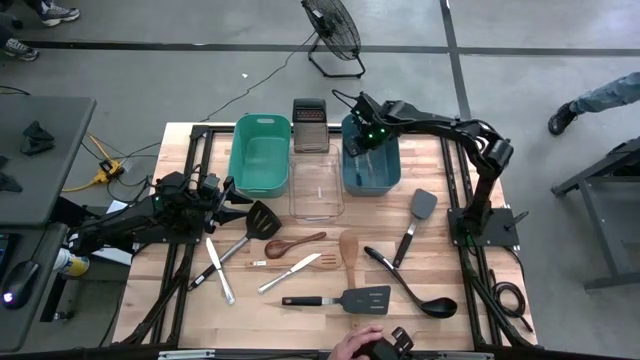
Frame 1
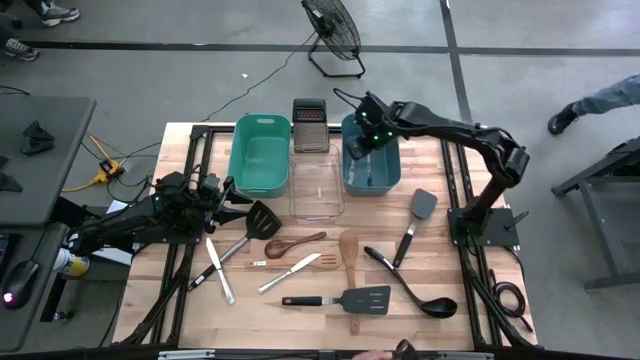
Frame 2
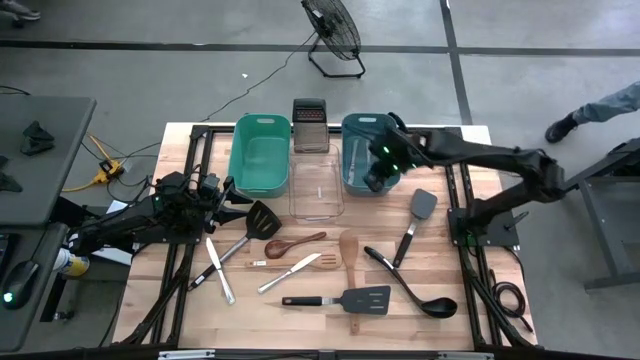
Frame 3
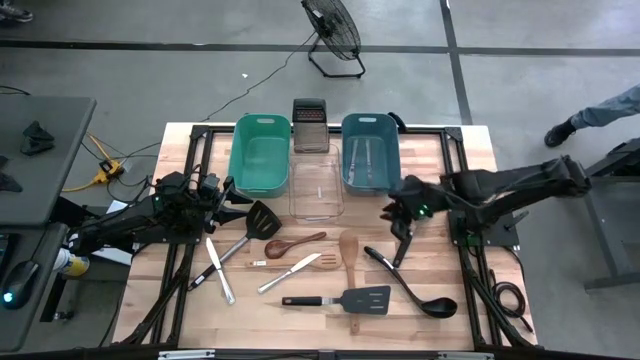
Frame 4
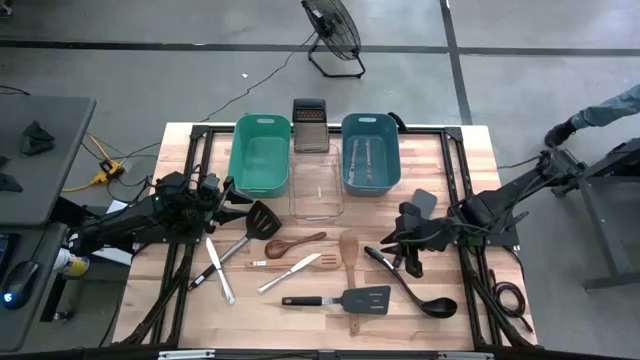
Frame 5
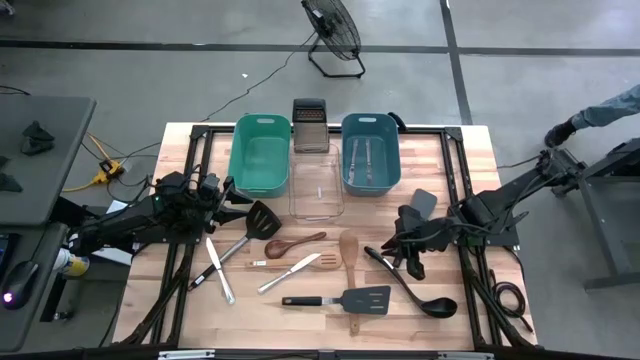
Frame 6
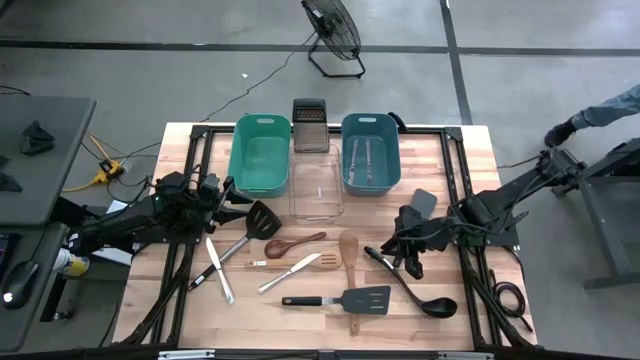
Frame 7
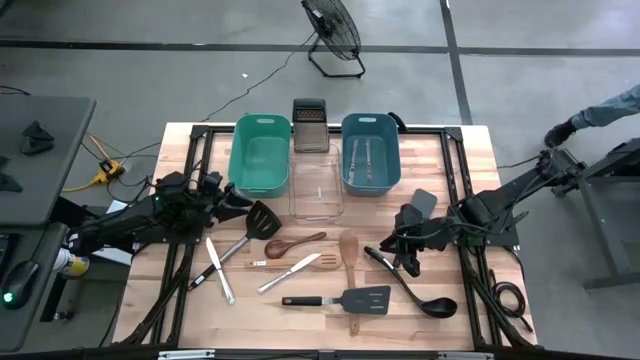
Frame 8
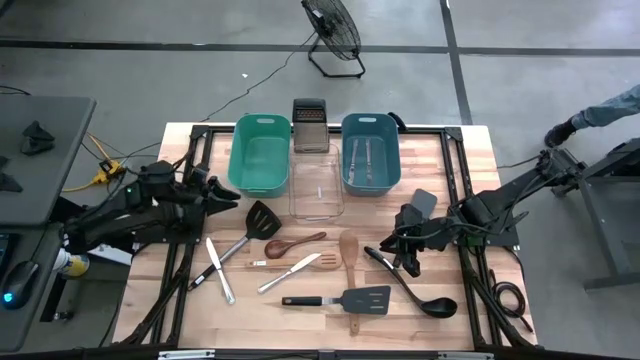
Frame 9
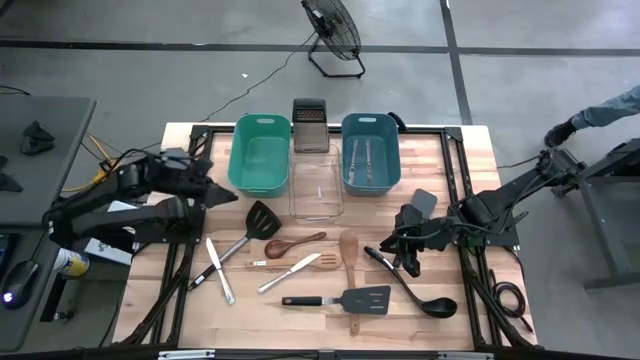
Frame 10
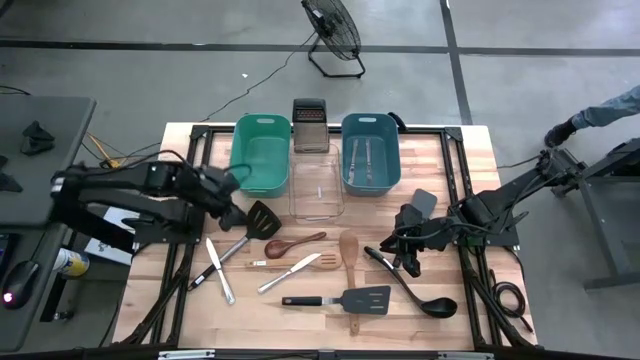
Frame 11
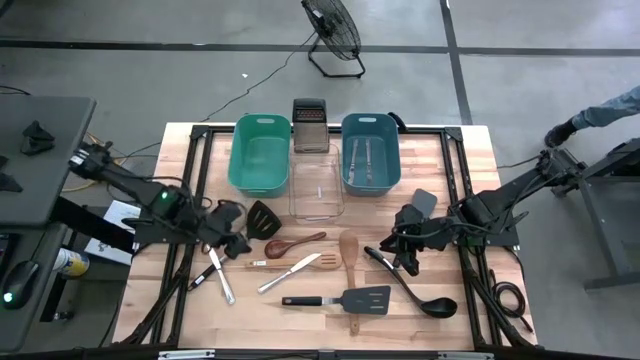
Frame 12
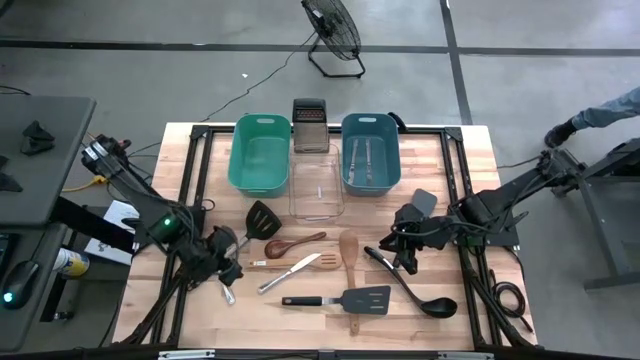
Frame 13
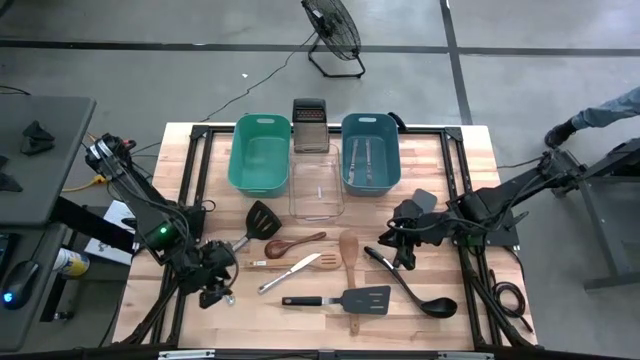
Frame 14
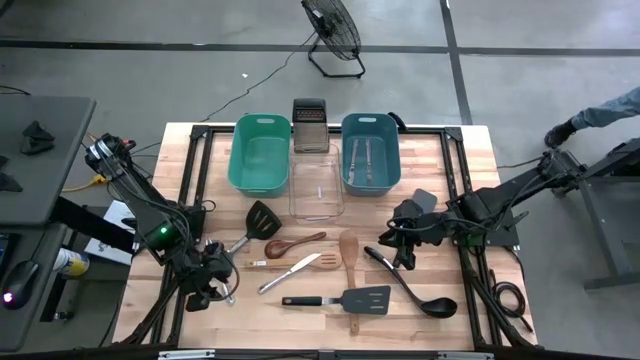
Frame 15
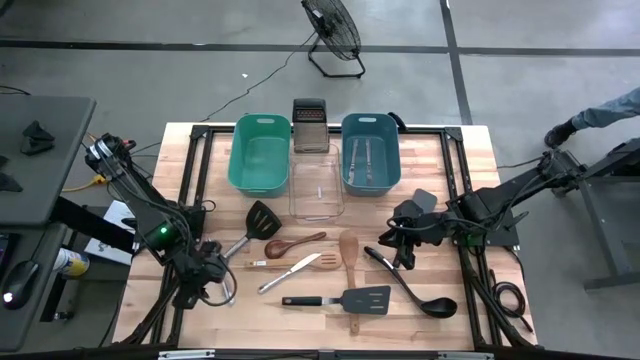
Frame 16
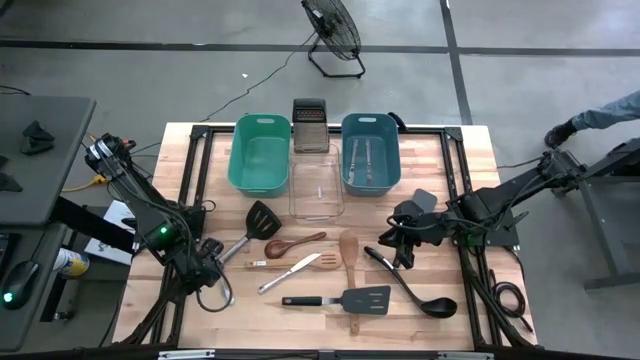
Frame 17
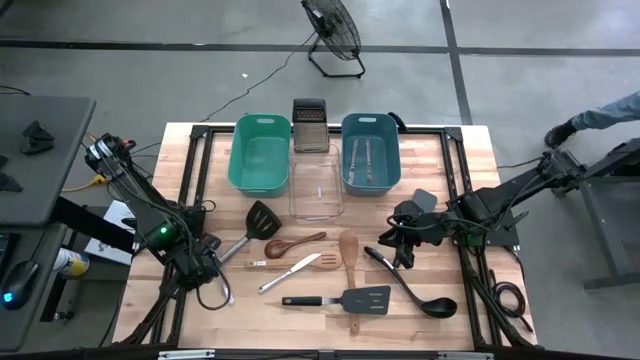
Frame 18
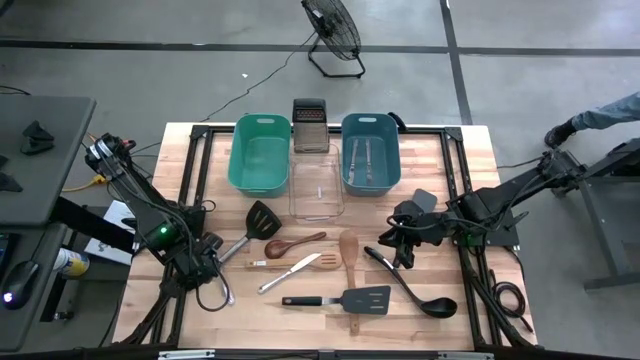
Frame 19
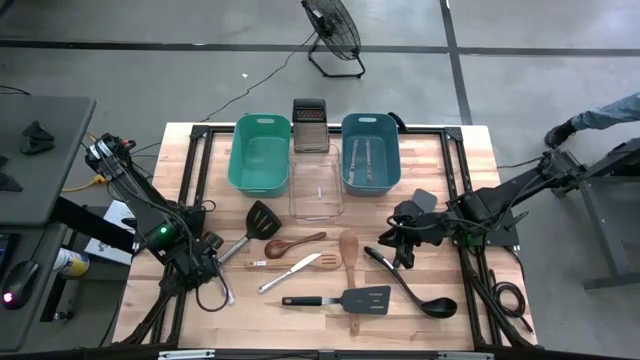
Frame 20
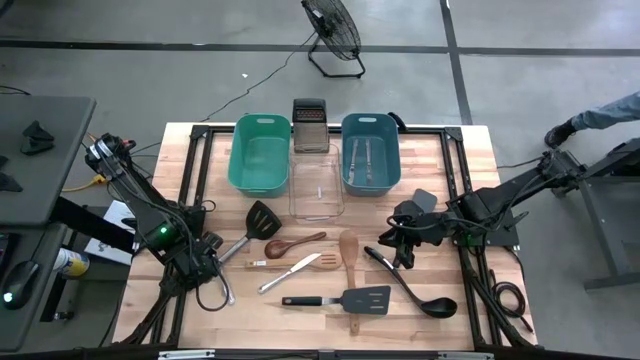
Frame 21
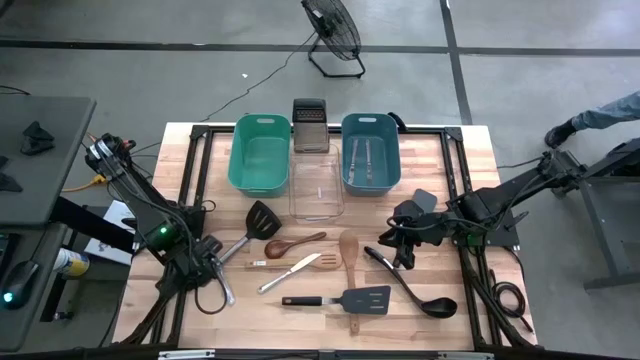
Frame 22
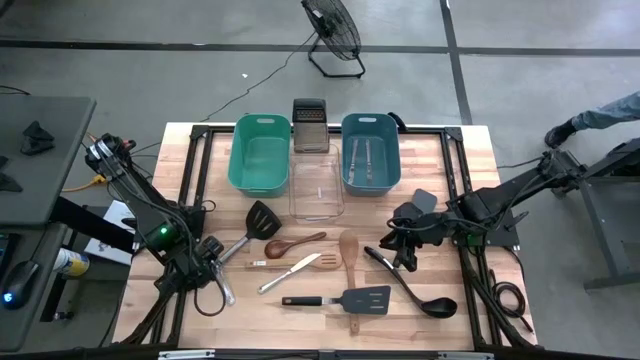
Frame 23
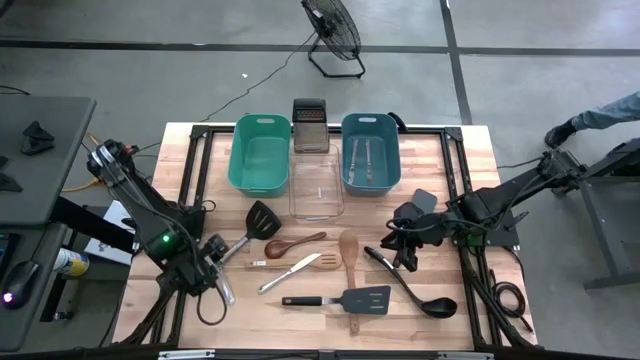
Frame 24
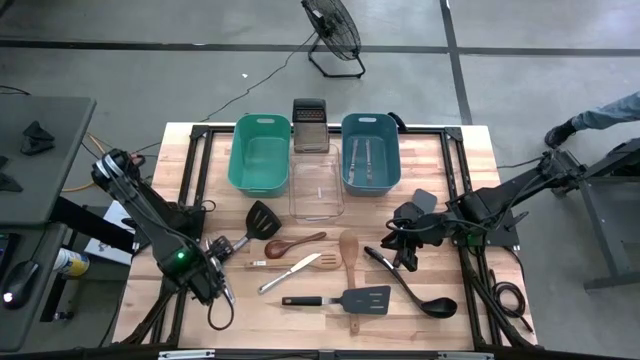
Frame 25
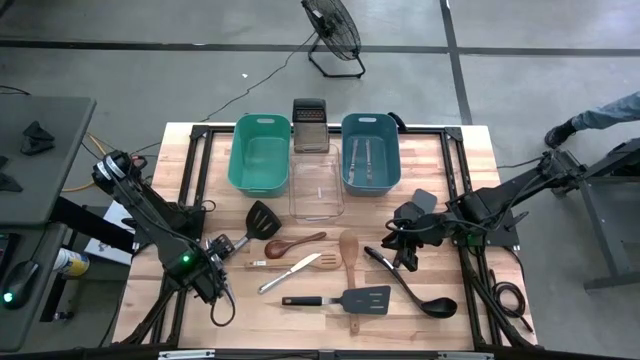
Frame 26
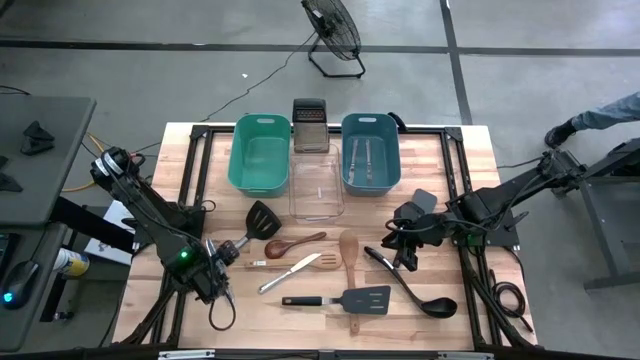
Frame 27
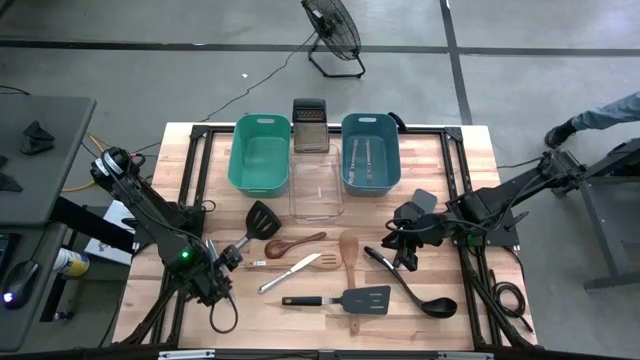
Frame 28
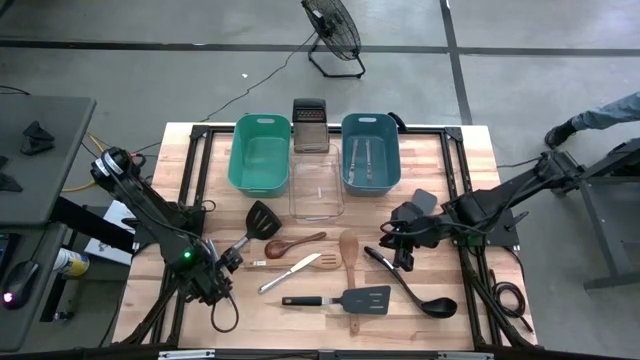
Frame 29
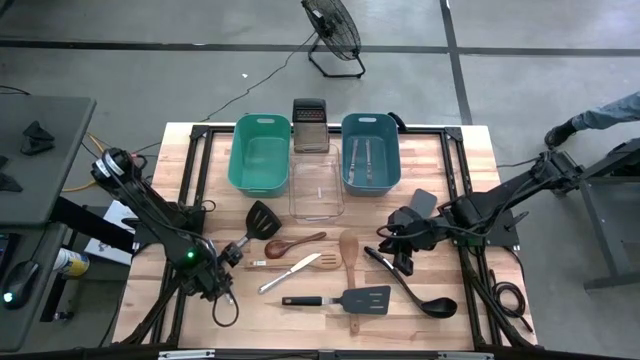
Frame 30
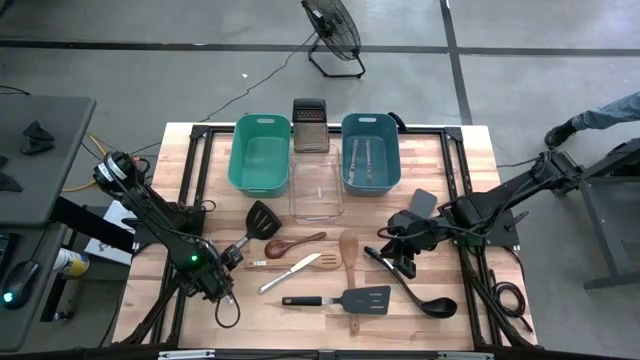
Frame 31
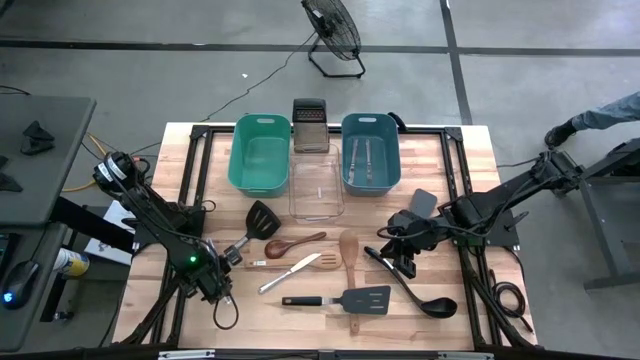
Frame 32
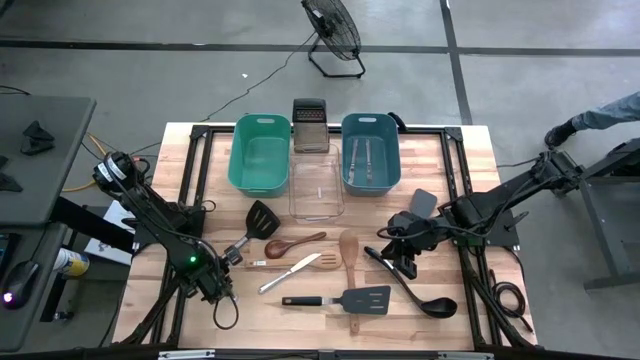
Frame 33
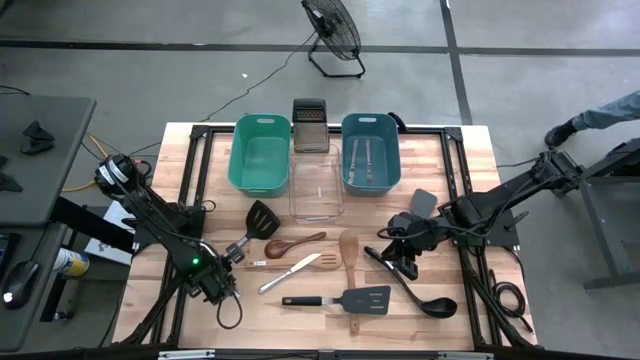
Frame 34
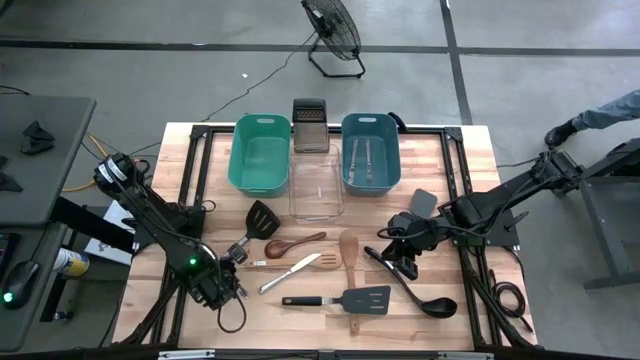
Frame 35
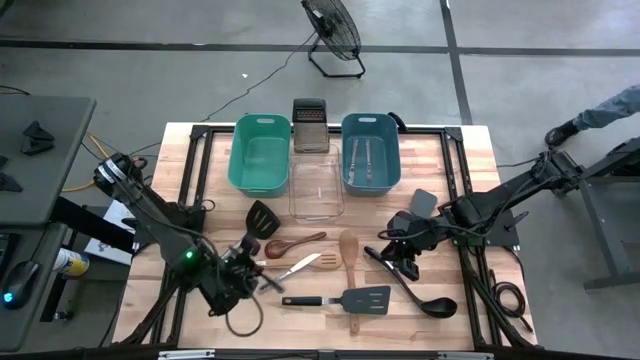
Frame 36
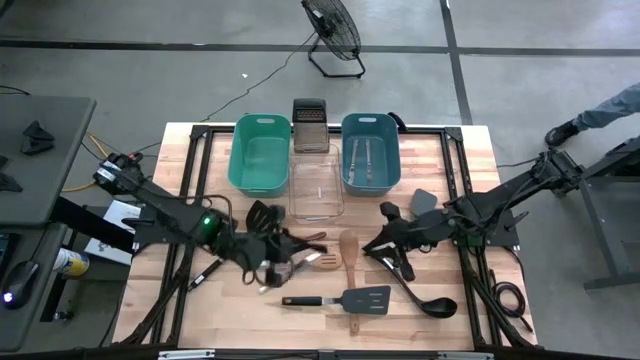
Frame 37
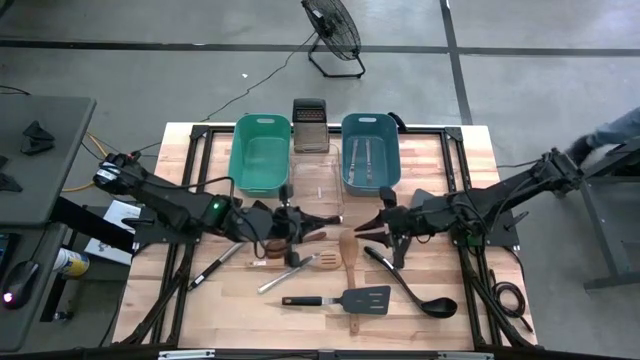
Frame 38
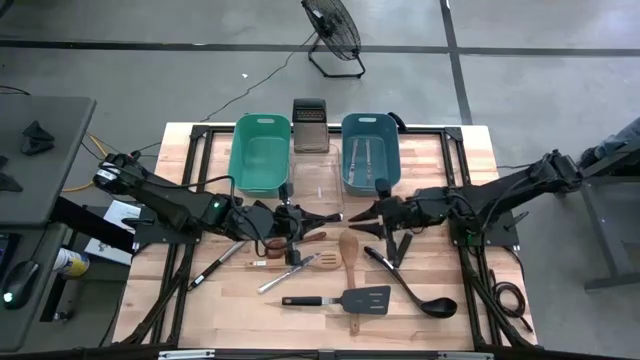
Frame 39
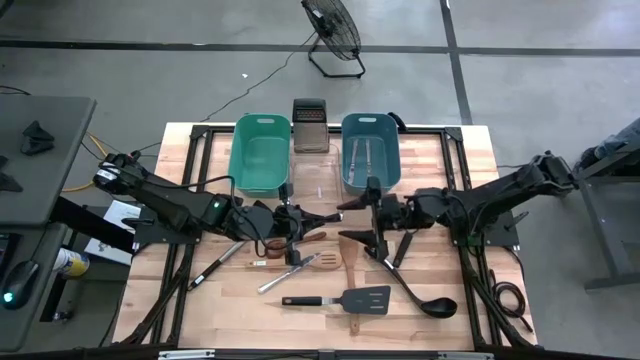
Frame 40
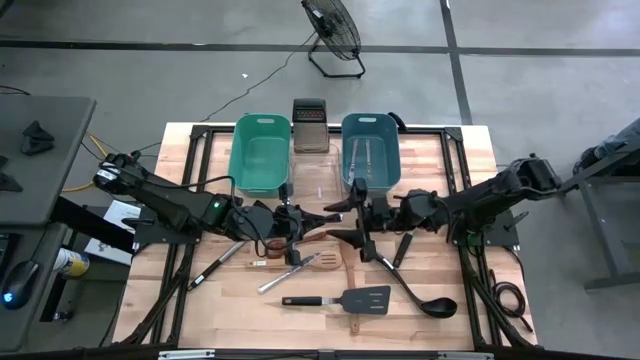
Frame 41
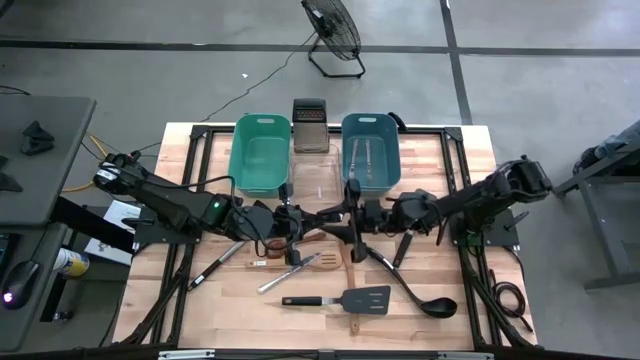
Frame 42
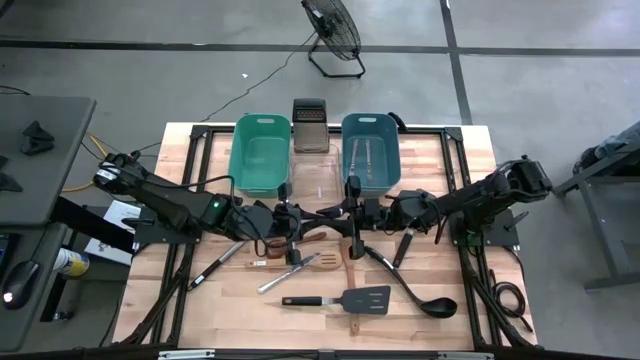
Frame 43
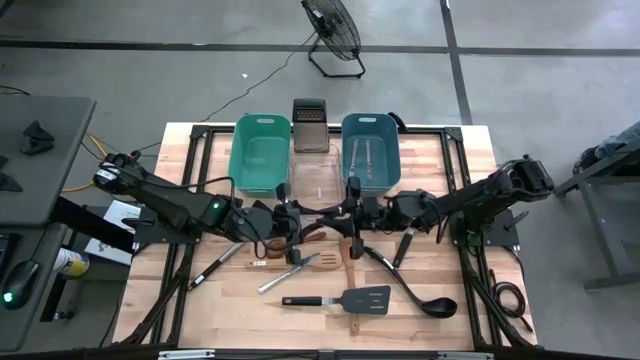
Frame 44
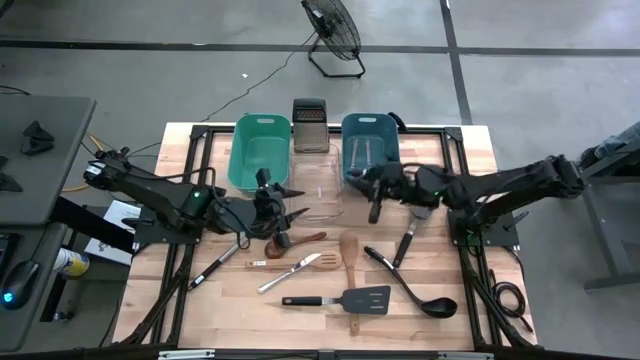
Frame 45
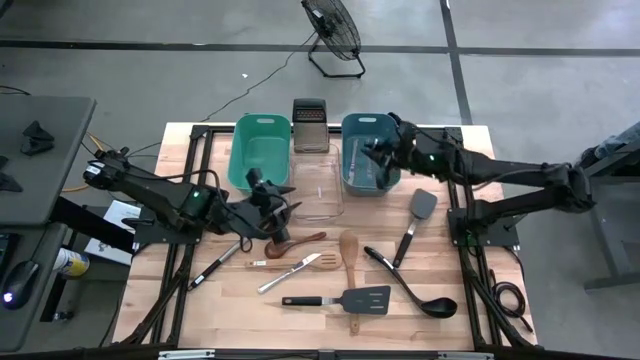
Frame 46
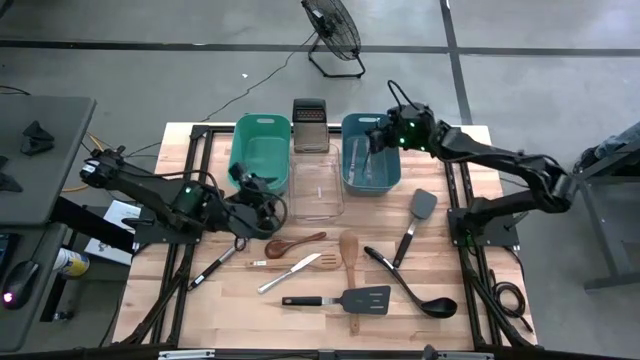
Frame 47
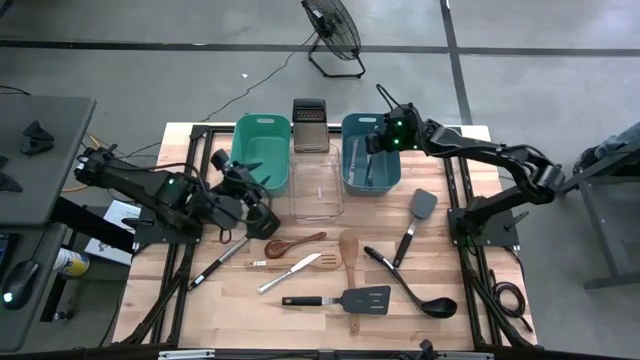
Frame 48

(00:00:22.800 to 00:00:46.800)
Task: Pick & Place Kitchen Items
Put the left table knife into the blue bin
